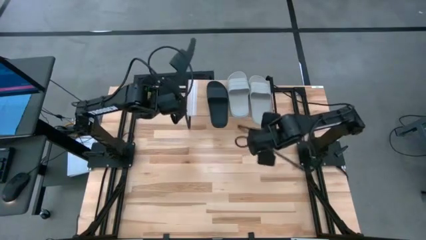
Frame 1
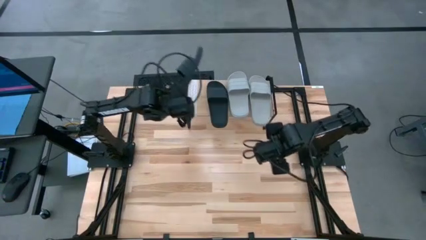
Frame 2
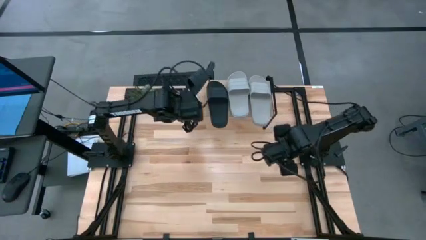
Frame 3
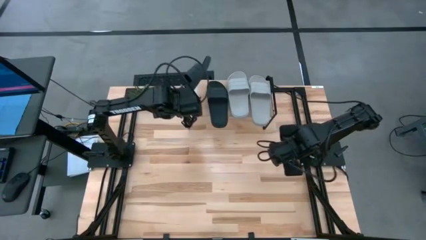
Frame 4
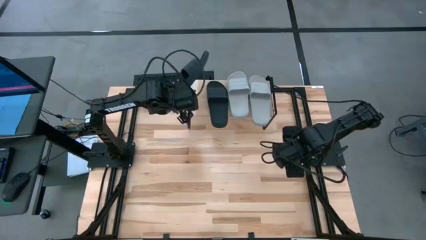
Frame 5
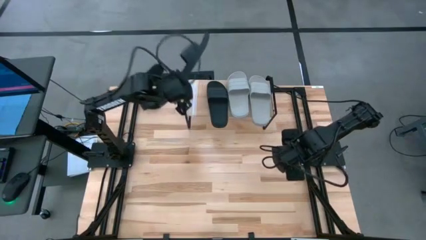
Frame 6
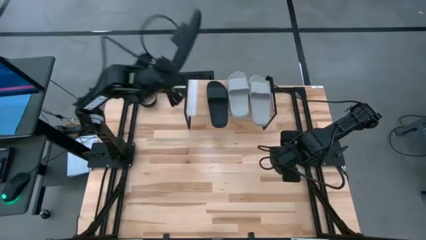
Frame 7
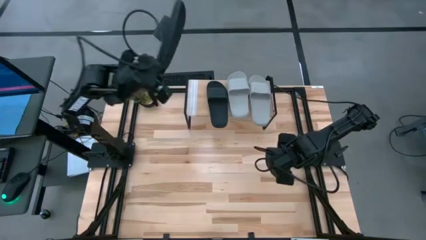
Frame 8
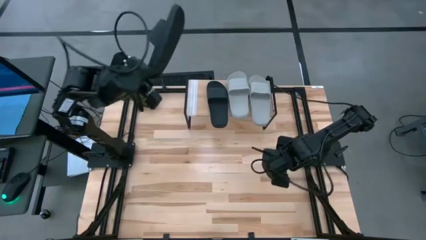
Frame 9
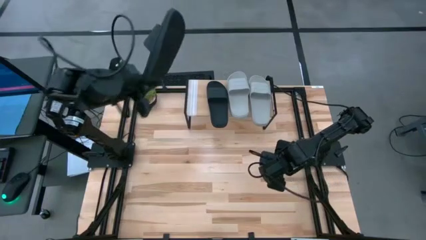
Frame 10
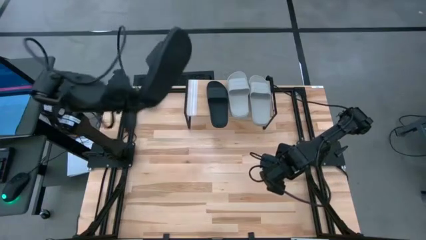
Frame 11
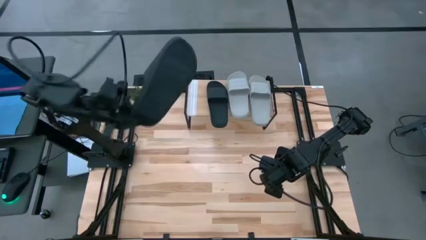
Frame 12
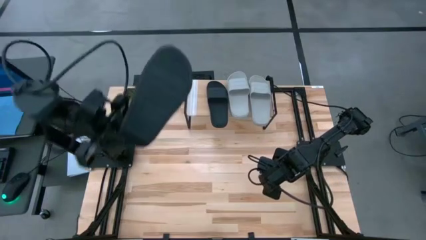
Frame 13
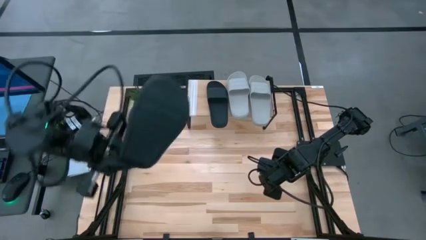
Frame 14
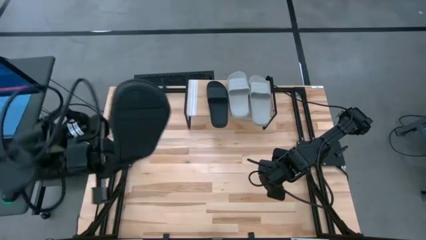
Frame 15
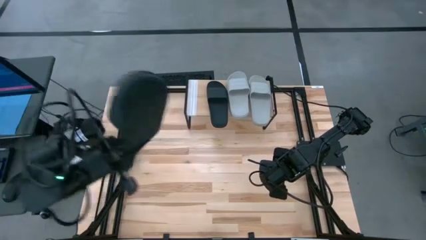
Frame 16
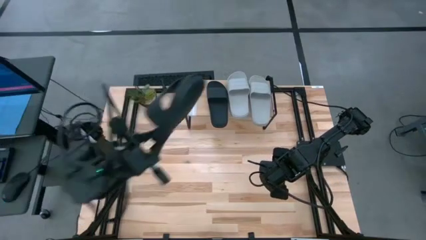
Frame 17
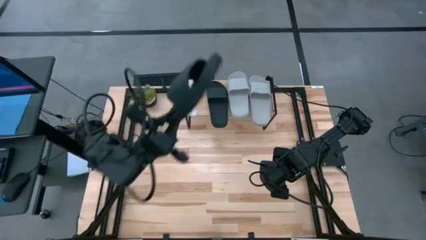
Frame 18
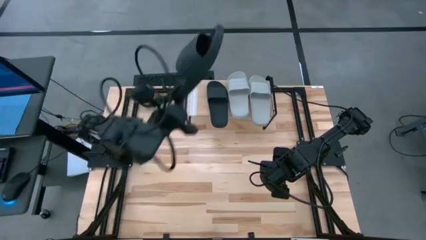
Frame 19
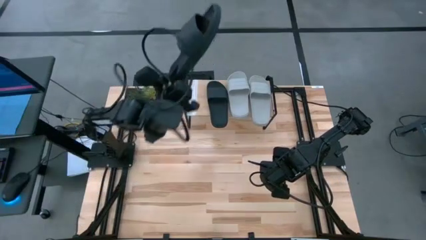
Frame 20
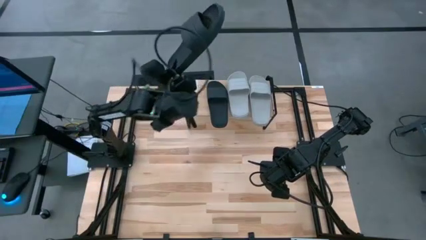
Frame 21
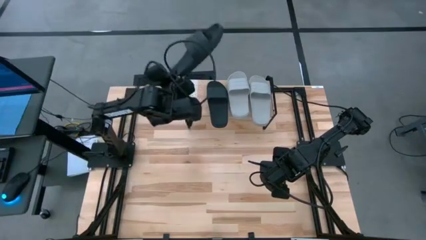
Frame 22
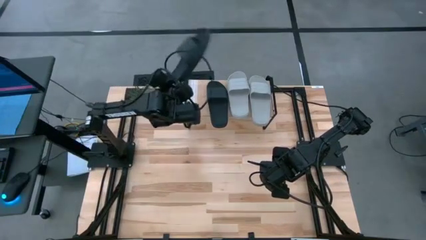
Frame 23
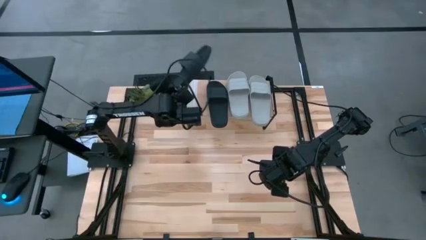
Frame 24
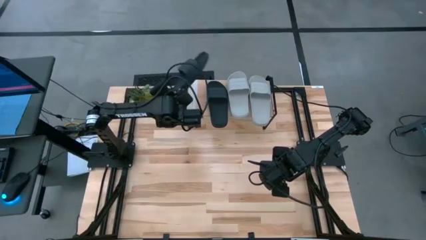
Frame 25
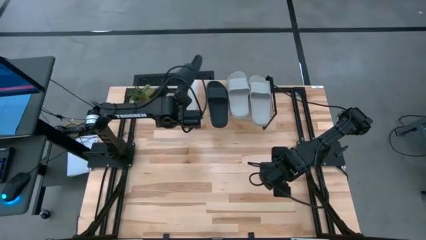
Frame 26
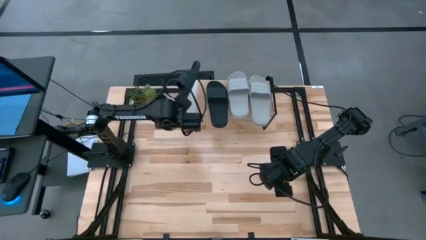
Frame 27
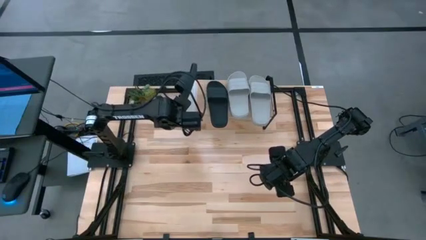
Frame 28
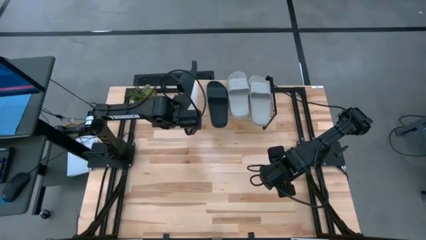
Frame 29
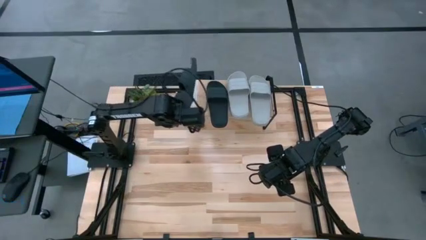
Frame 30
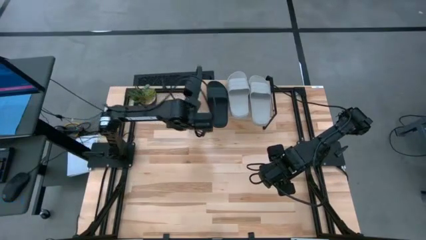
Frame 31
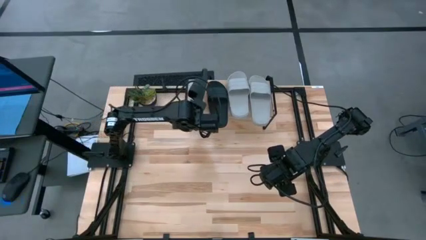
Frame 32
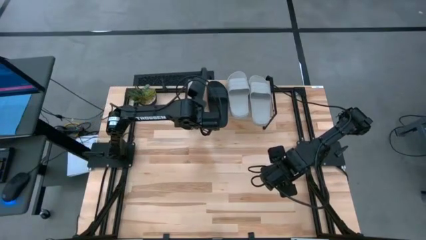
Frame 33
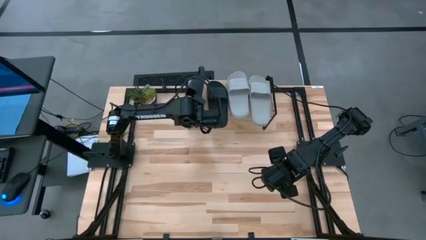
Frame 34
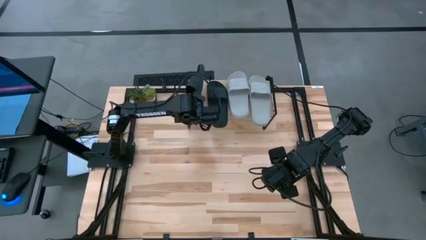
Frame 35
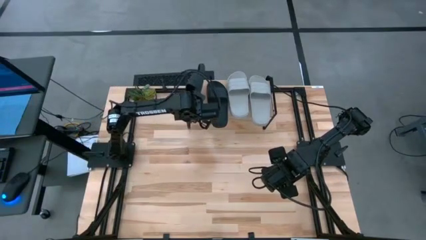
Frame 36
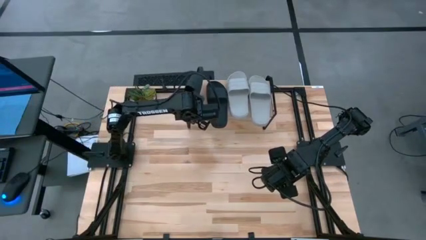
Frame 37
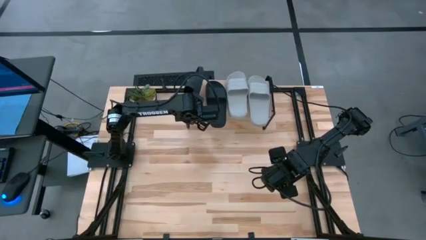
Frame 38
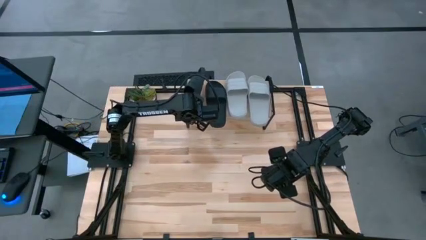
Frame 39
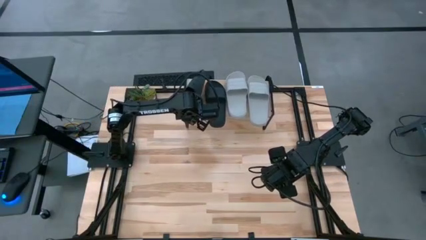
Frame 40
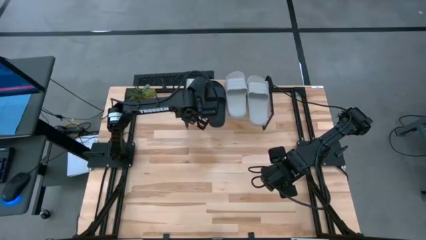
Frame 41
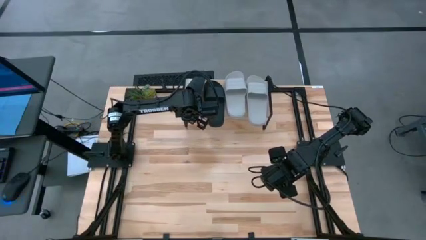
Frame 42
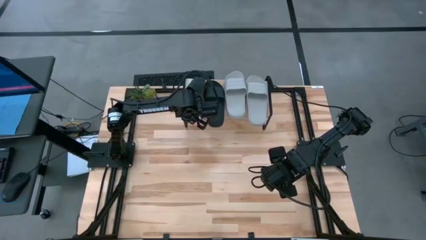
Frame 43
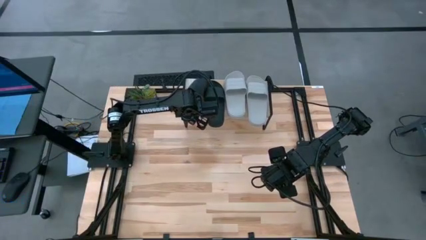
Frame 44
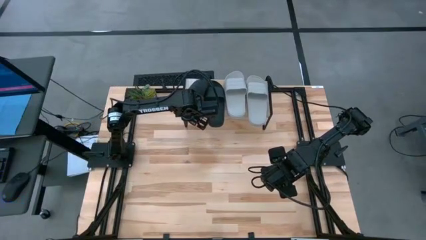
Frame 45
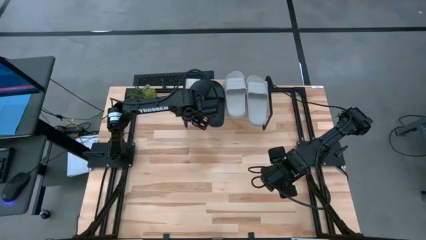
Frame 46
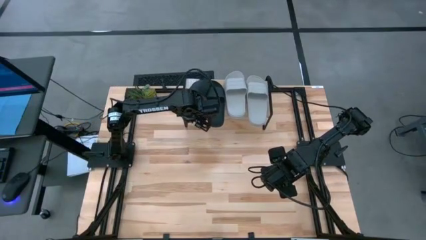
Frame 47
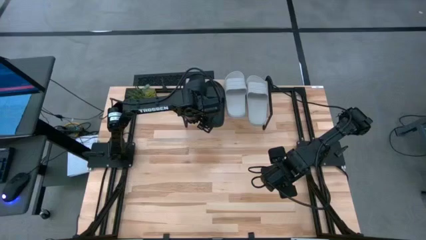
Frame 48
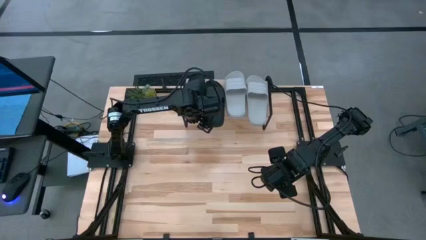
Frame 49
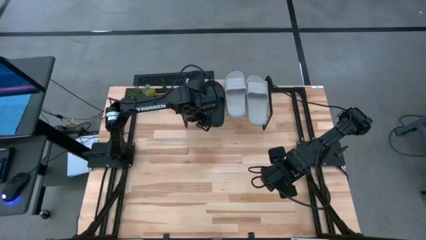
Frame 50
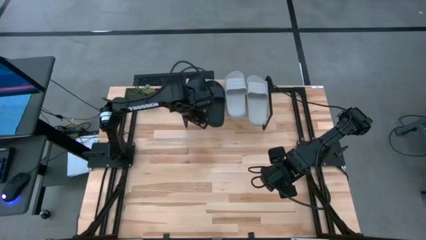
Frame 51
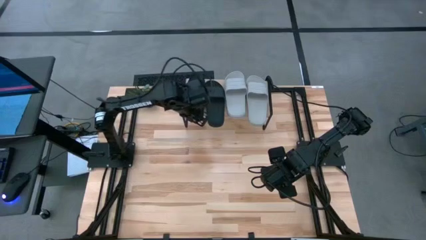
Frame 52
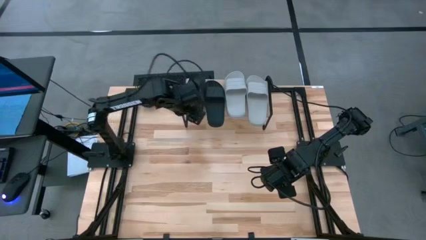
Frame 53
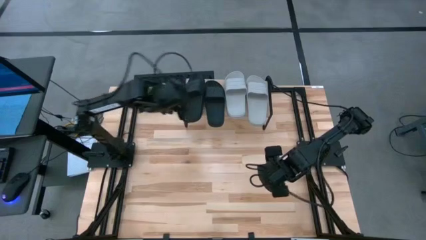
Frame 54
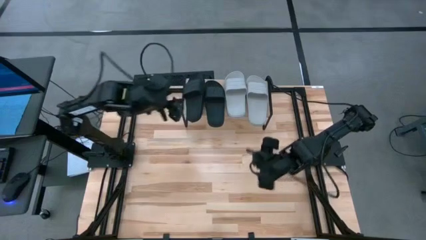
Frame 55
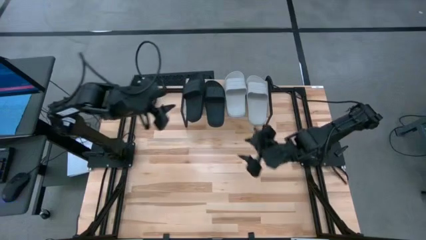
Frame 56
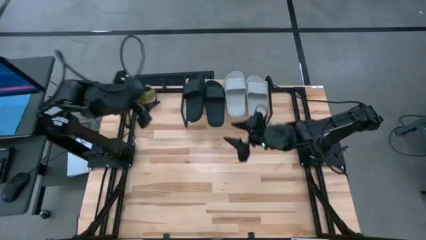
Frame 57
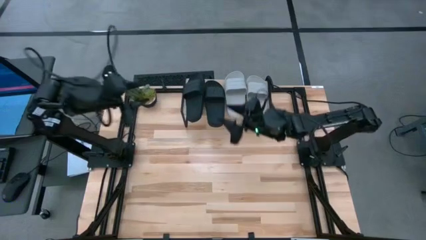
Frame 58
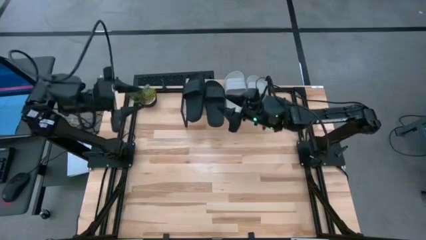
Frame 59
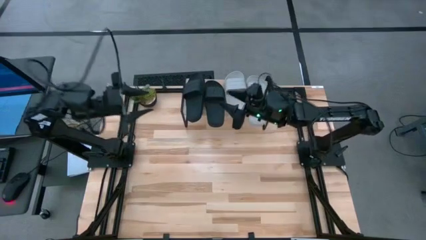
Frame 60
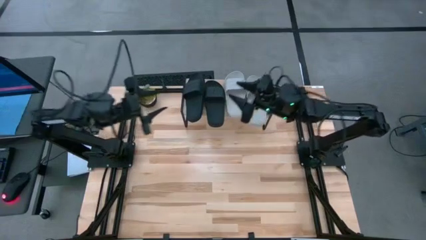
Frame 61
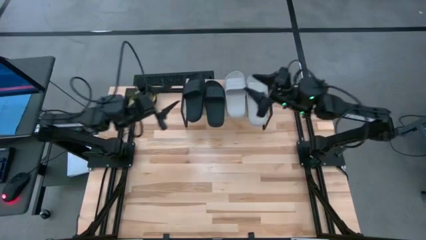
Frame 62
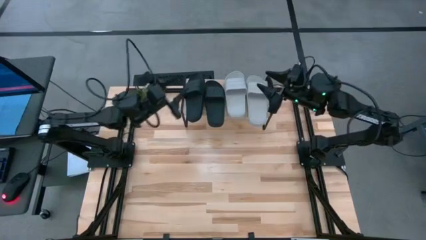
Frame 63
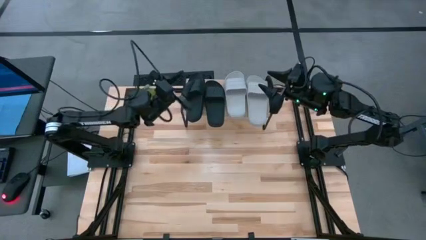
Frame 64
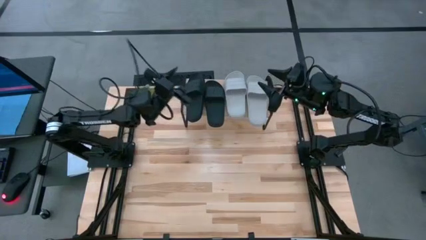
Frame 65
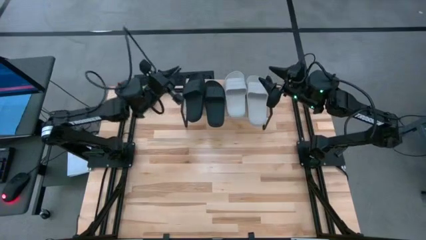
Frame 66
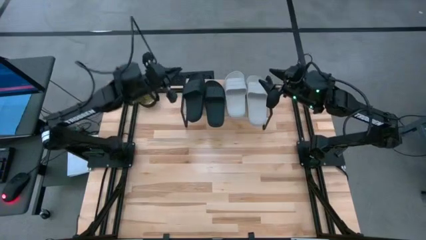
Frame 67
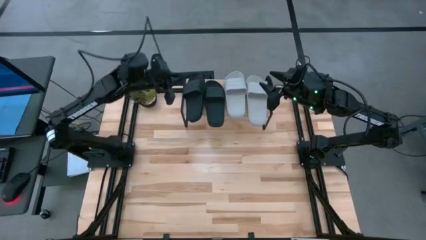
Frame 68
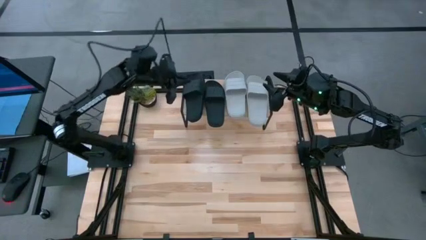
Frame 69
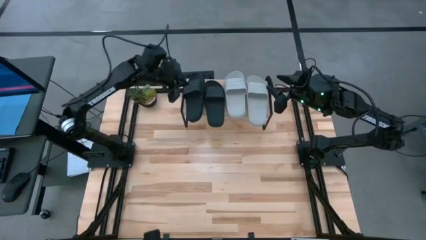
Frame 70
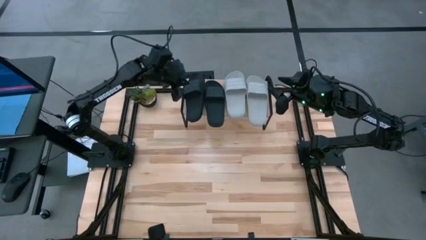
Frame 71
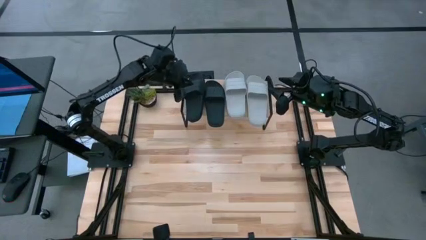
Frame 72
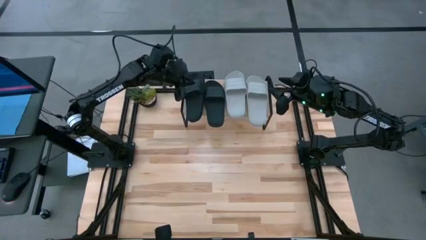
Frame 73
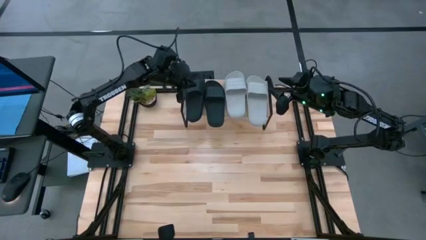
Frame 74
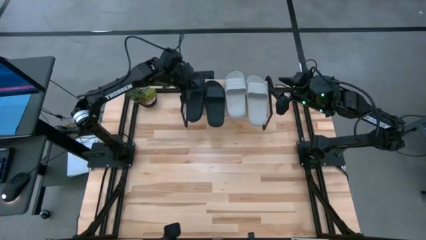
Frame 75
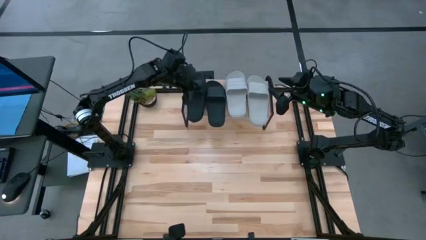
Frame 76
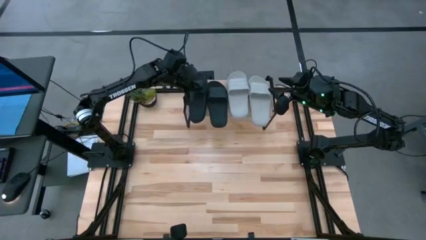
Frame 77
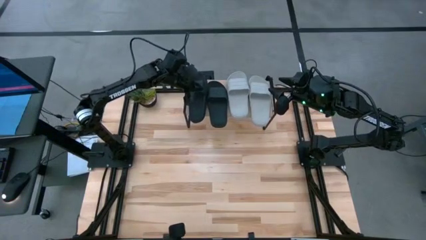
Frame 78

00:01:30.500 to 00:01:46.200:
Task: Pick and place slides into the shelf
Put the black slide on the shelf
